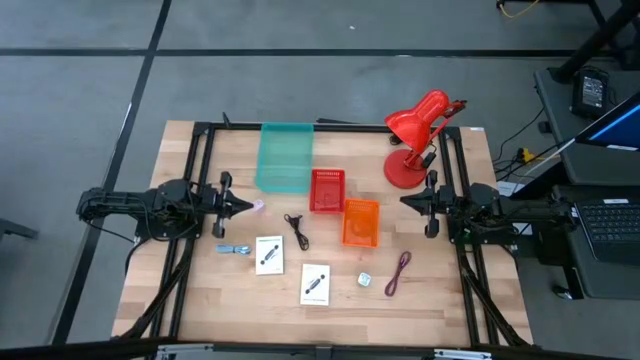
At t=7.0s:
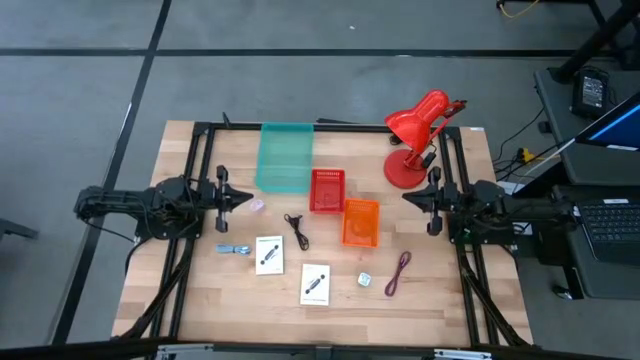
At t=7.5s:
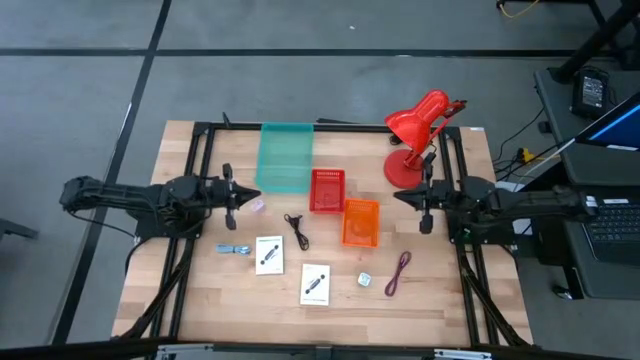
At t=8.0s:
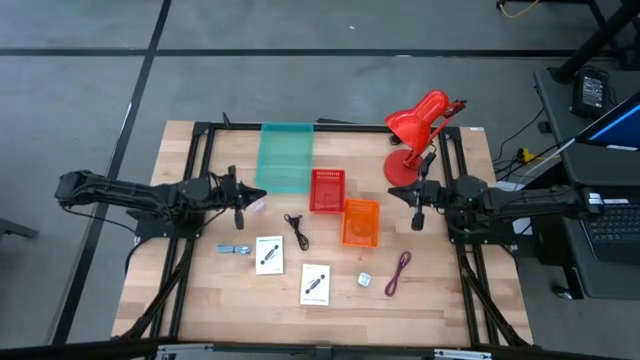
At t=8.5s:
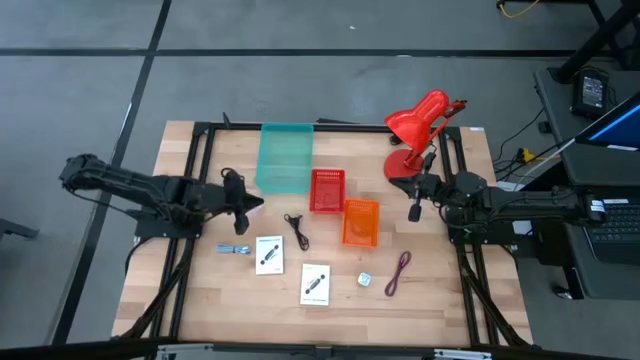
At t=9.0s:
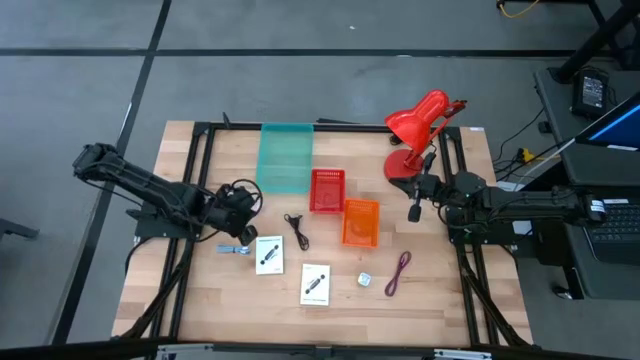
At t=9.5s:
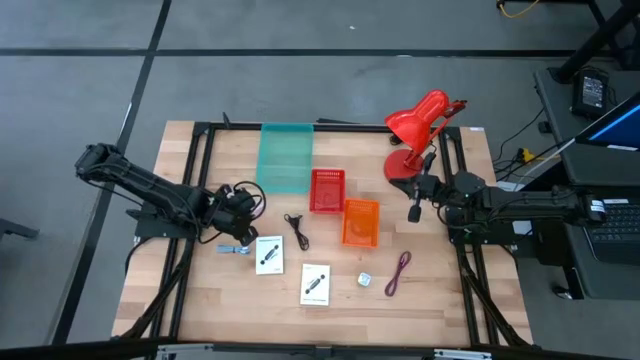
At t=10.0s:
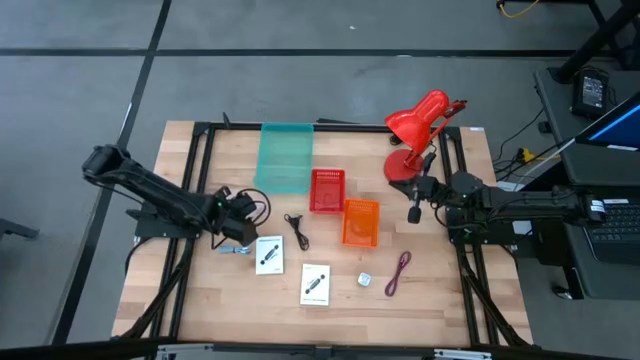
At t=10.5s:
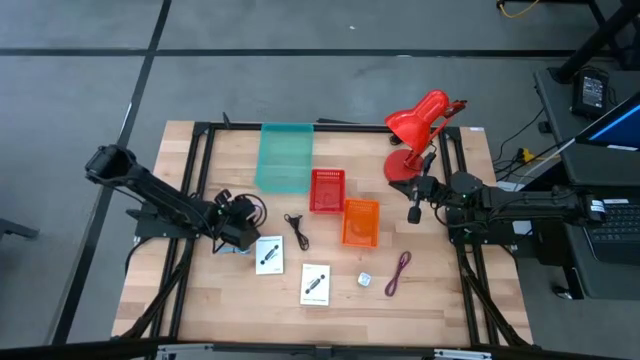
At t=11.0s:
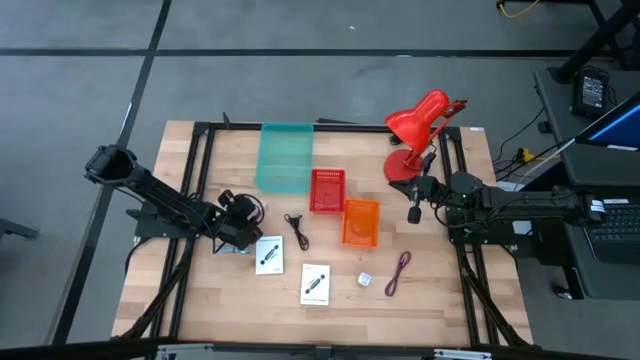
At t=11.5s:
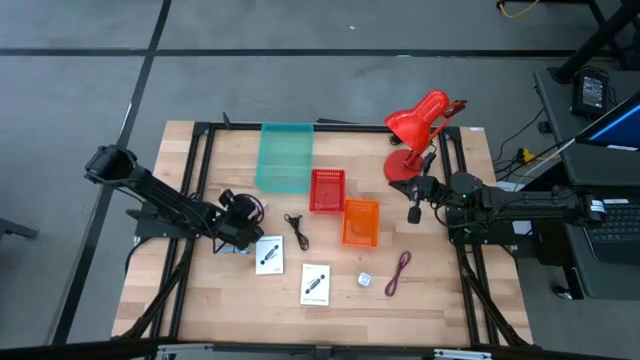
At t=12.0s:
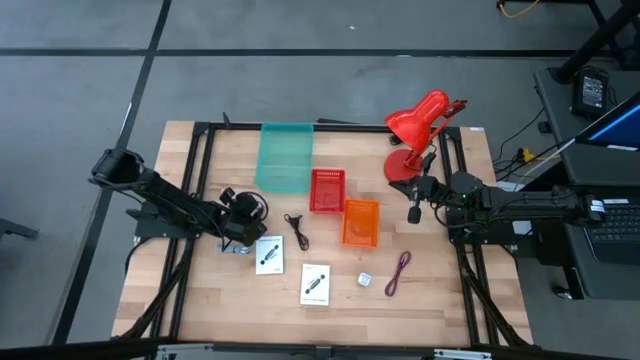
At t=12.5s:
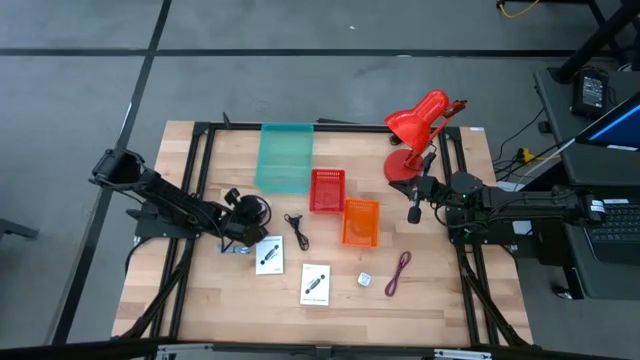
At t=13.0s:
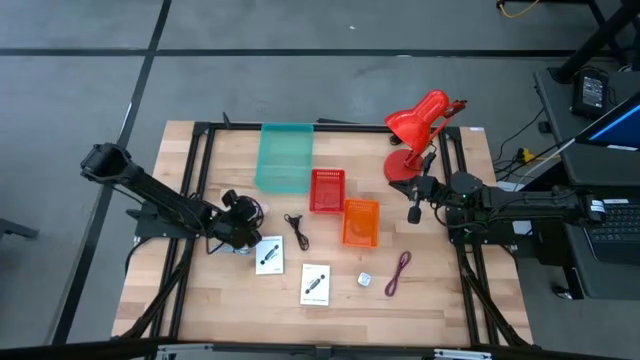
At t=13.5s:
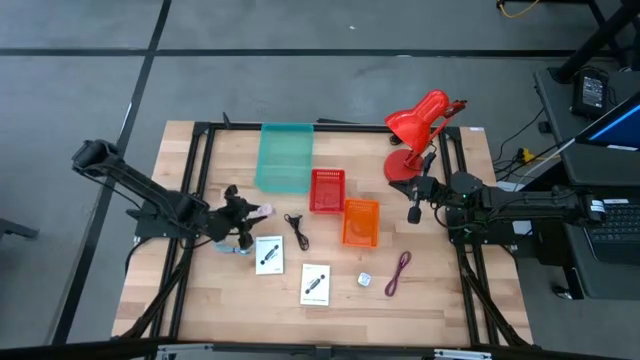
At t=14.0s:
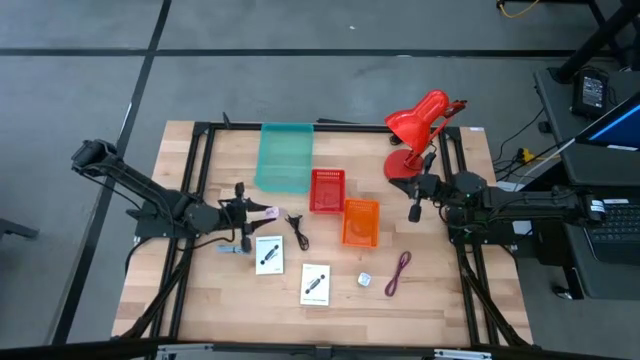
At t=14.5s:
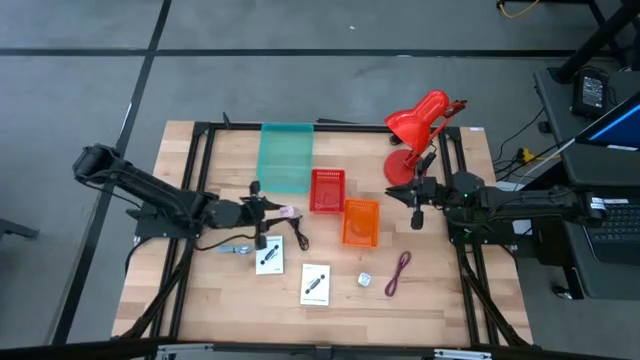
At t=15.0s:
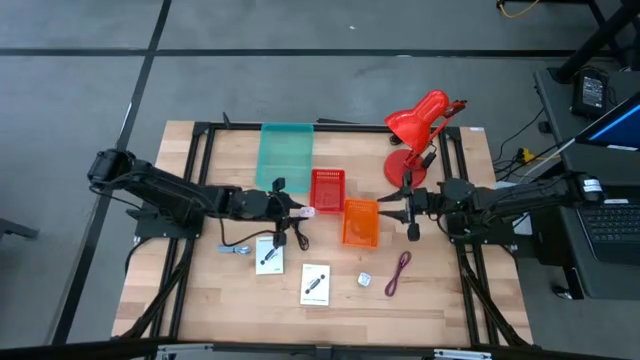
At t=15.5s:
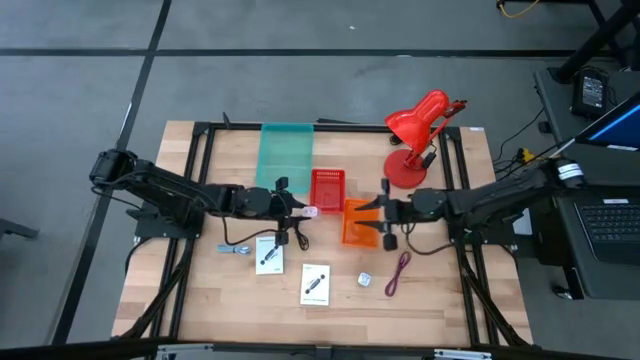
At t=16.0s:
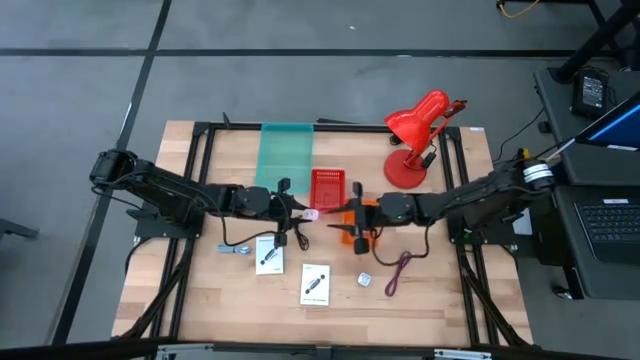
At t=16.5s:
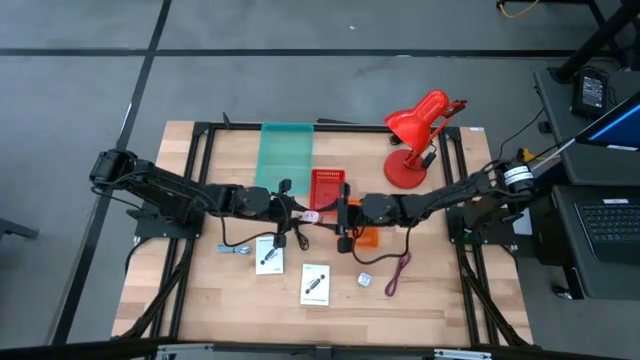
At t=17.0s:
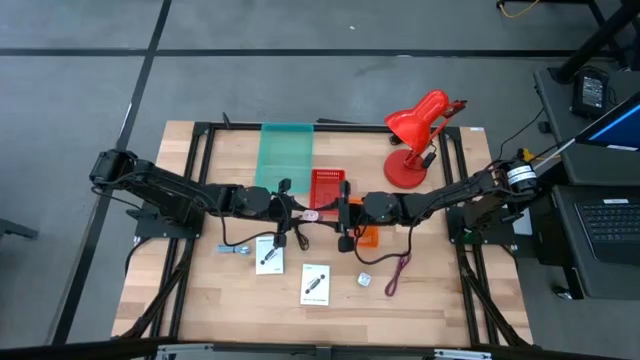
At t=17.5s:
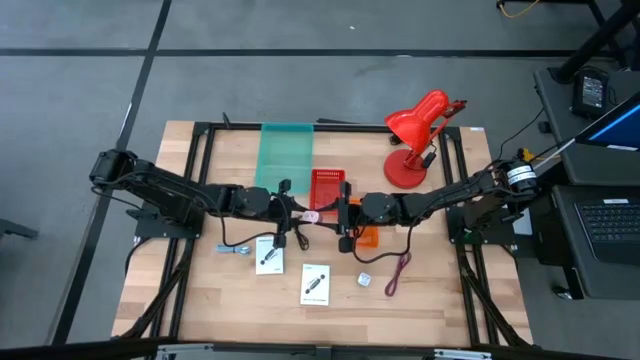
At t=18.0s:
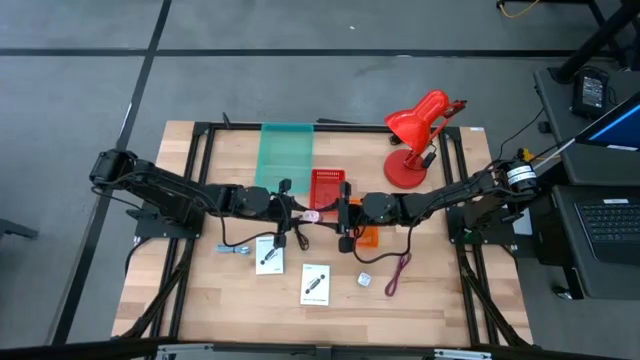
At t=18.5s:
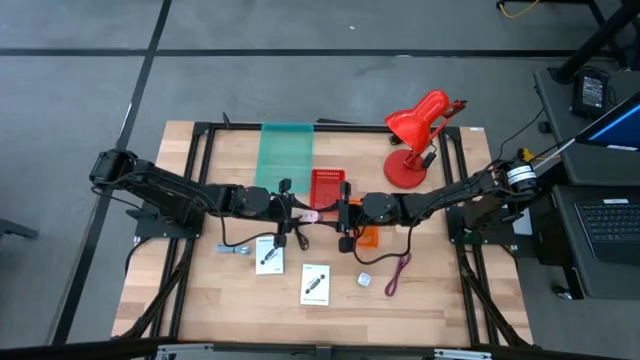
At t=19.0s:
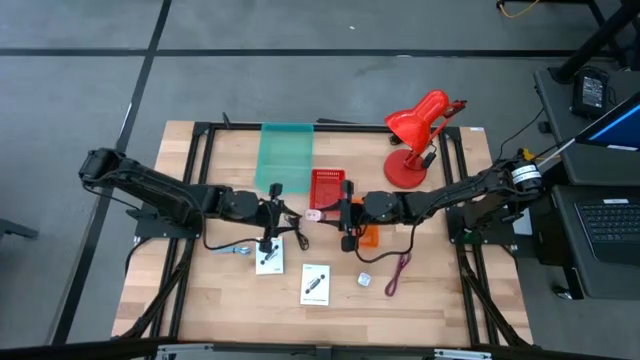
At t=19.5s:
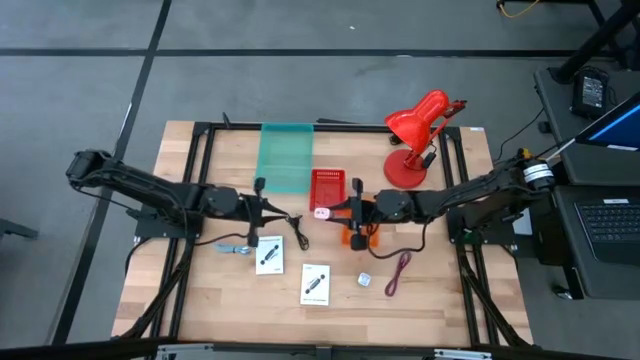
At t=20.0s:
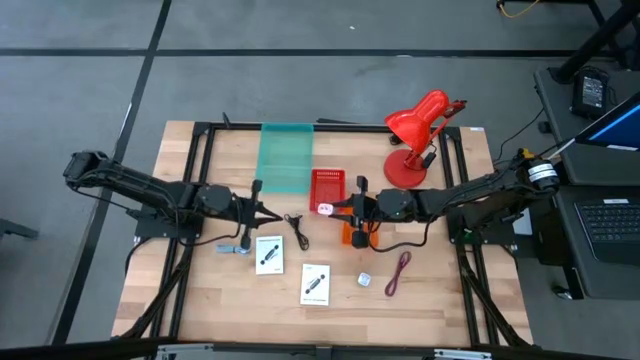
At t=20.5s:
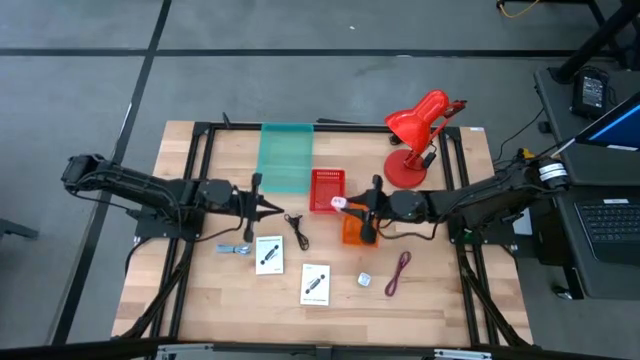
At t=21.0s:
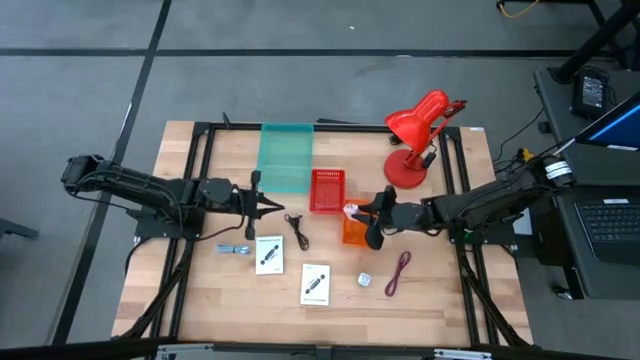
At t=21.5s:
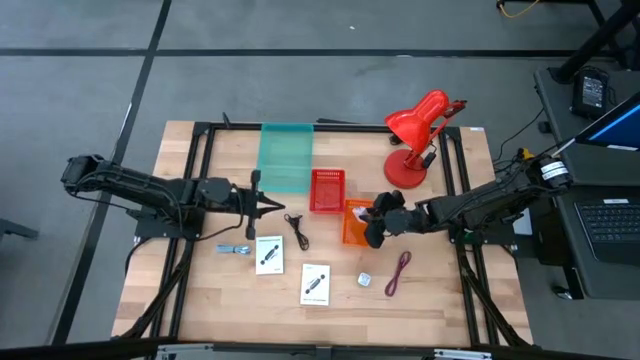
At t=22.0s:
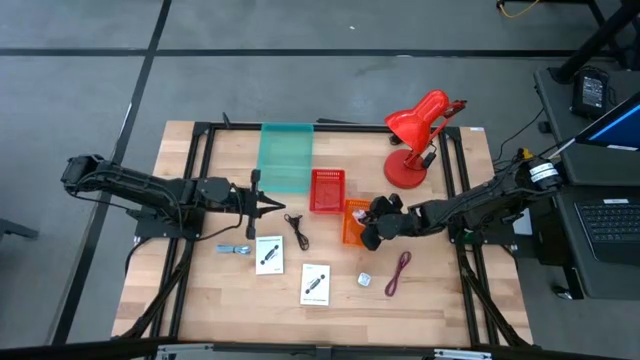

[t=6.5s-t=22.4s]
Task: Pick and place items into bin
Put the white charger adapter into the orange basket

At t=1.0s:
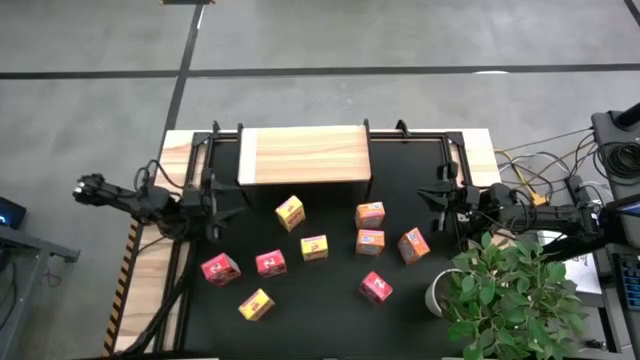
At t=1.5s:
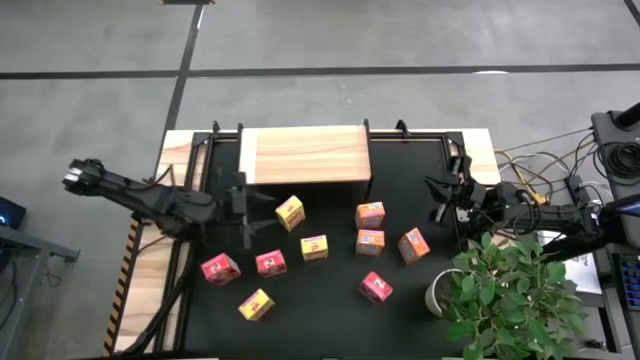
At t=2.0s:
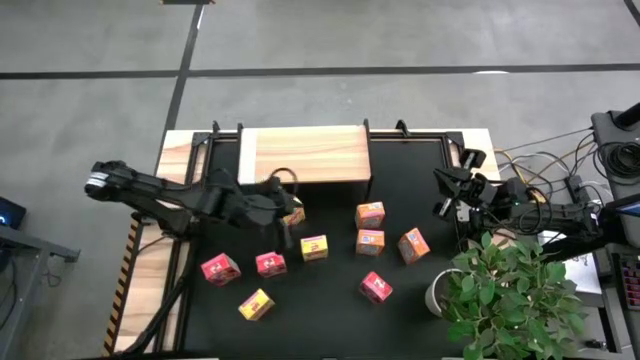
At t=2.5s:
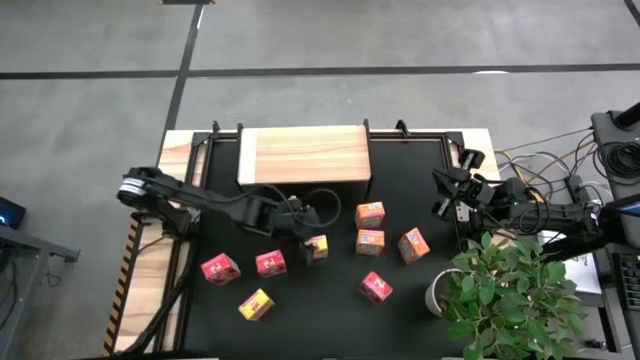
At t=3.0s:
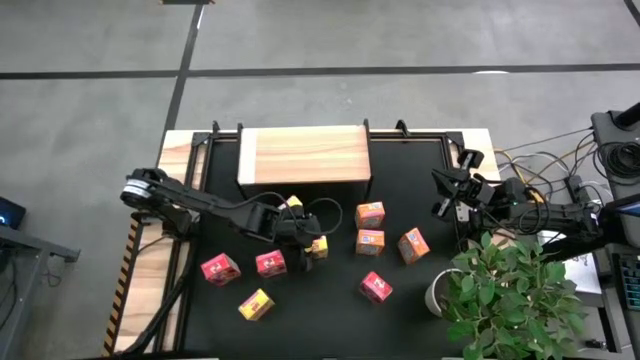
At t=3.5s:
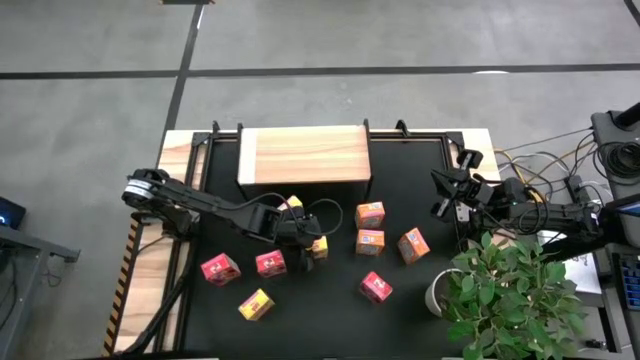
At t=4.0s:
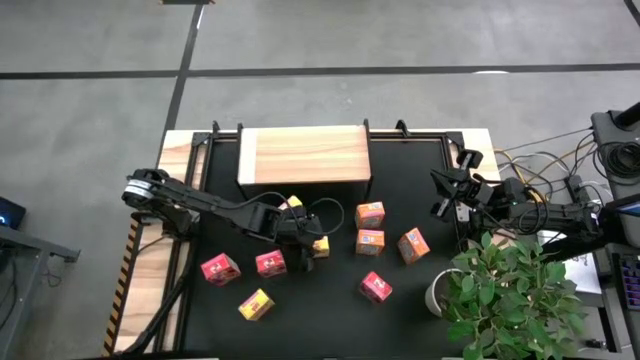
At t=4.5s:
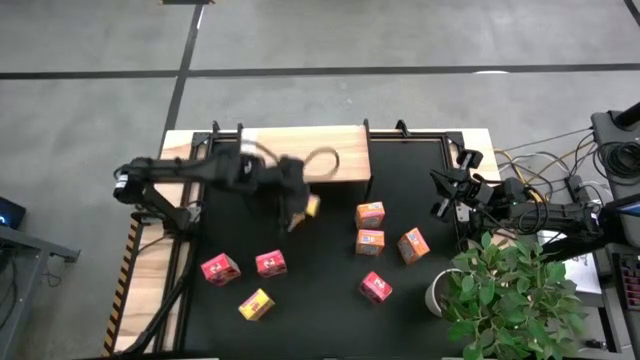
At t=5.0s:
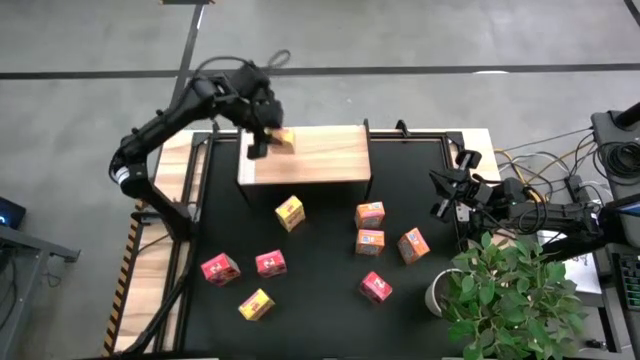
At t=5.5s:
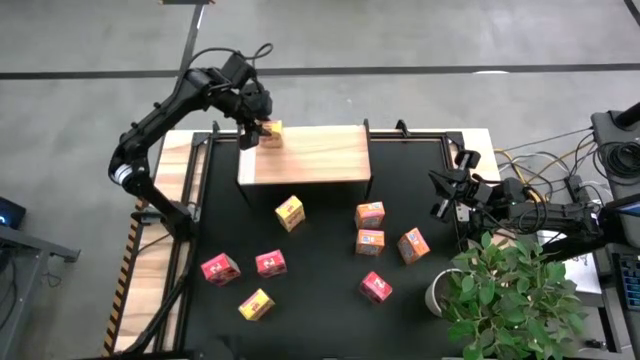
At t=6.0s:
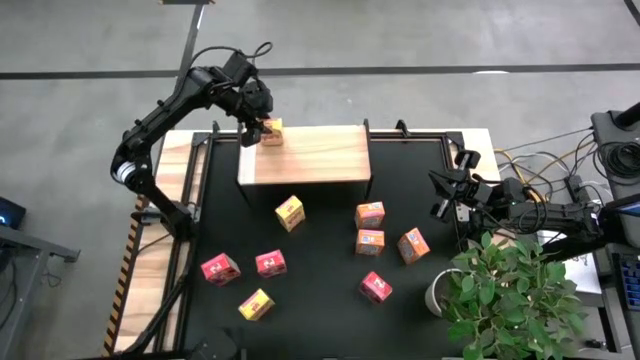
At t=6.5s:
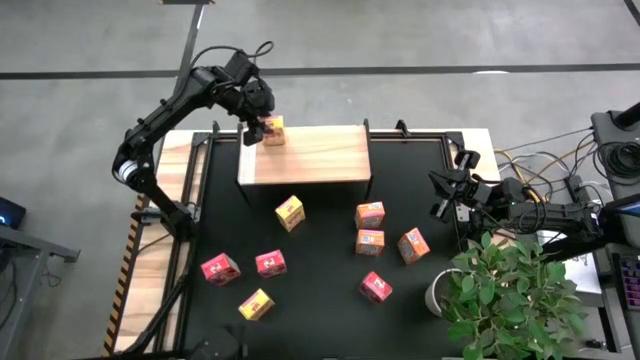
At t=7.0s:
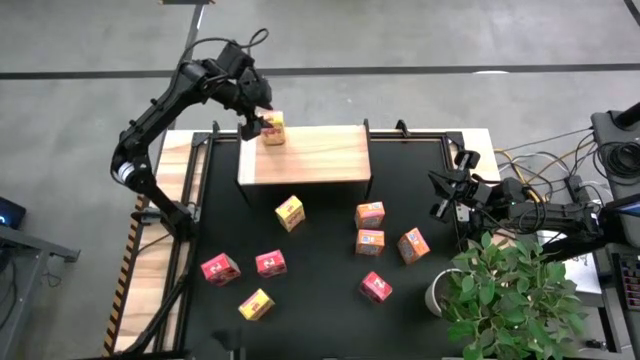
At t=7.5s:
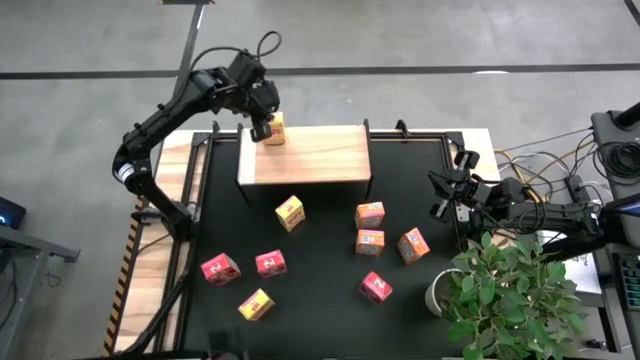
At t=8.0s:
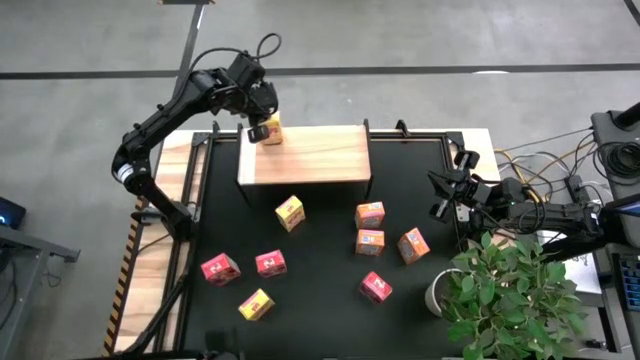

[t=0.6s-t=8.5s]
Task: Stack cereal on shelf
Put the middle yellow cereal box on the shelf
